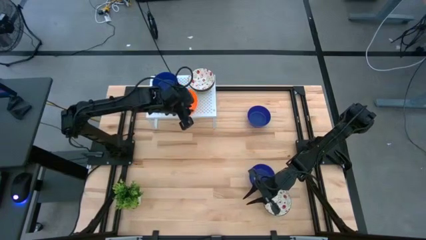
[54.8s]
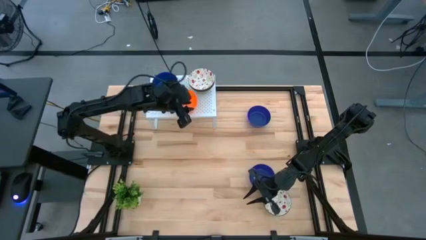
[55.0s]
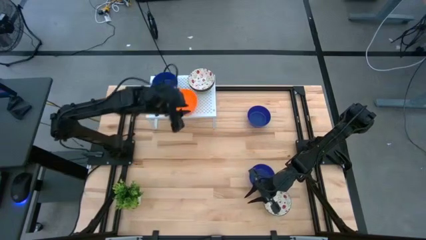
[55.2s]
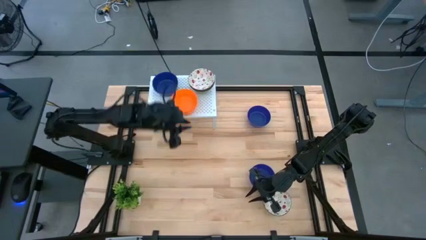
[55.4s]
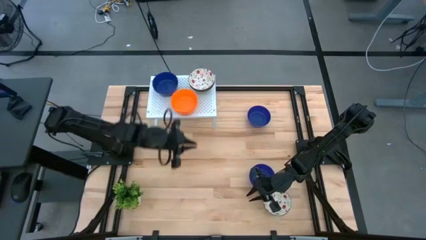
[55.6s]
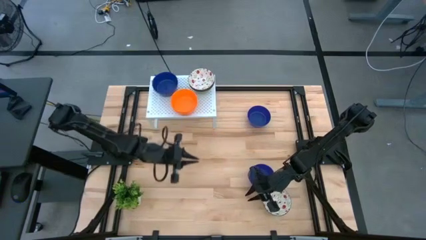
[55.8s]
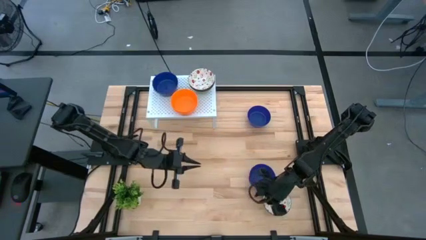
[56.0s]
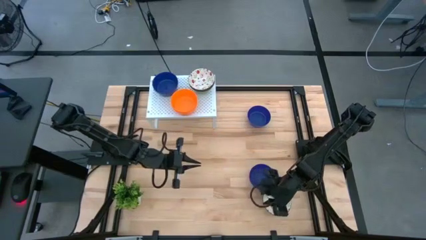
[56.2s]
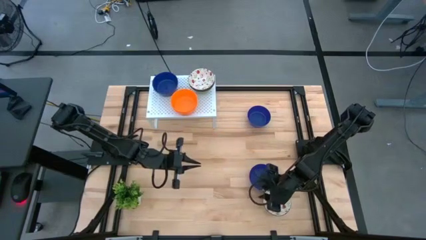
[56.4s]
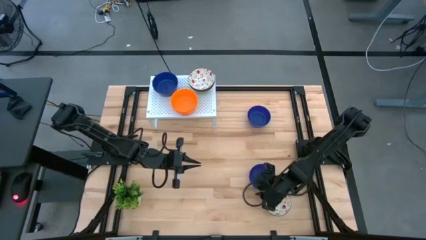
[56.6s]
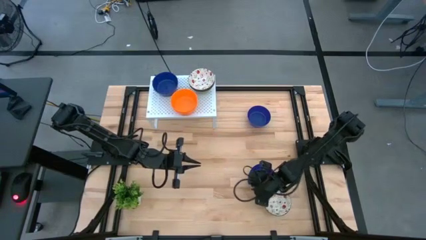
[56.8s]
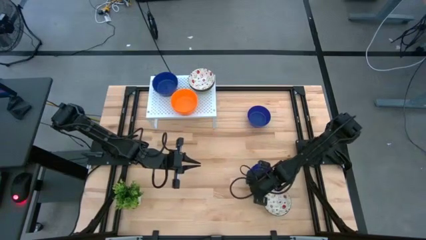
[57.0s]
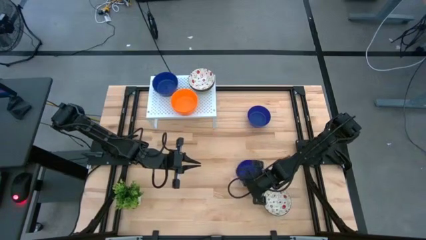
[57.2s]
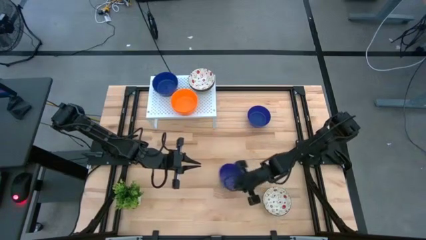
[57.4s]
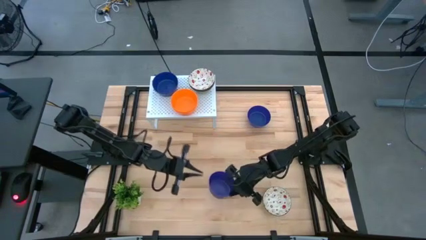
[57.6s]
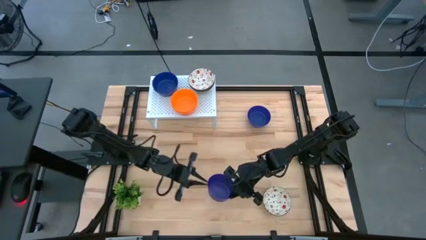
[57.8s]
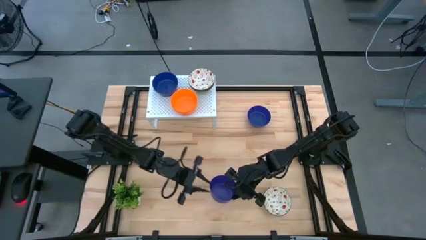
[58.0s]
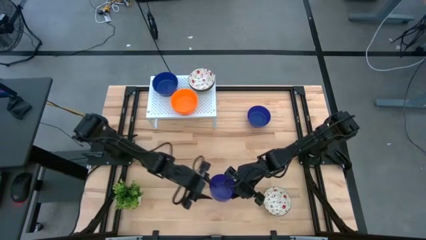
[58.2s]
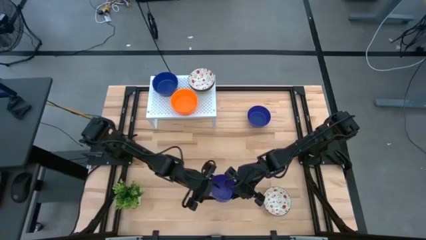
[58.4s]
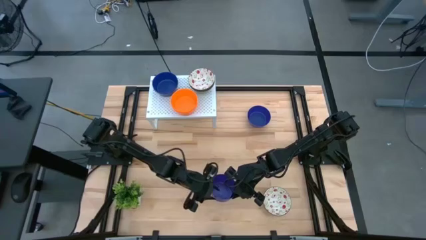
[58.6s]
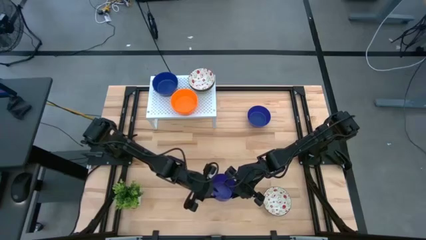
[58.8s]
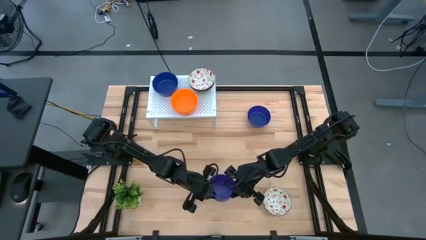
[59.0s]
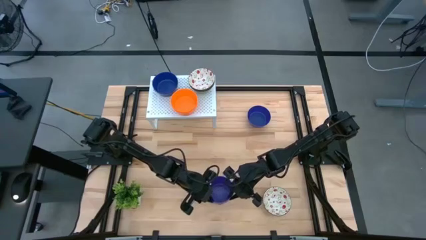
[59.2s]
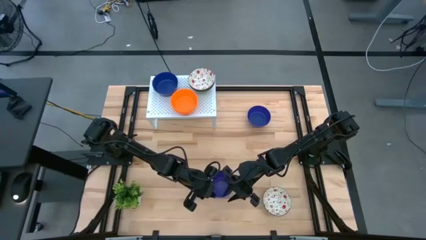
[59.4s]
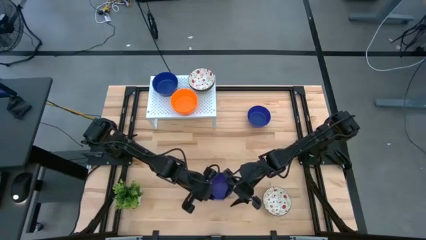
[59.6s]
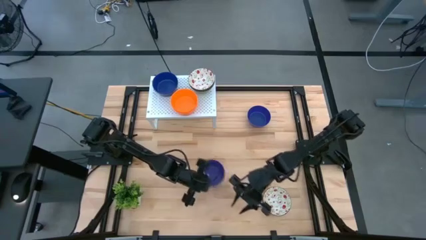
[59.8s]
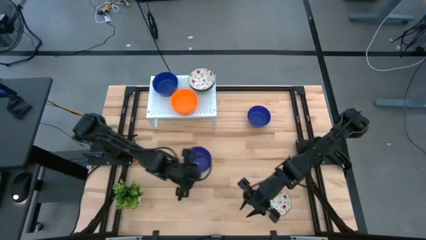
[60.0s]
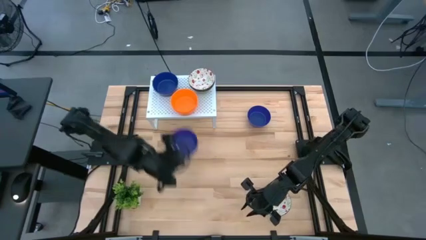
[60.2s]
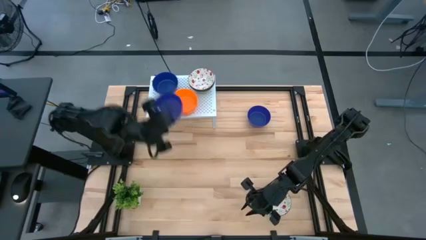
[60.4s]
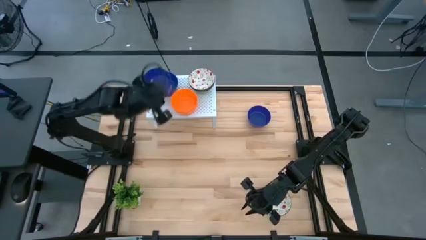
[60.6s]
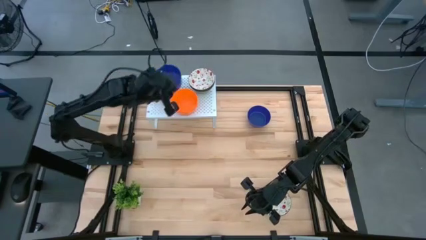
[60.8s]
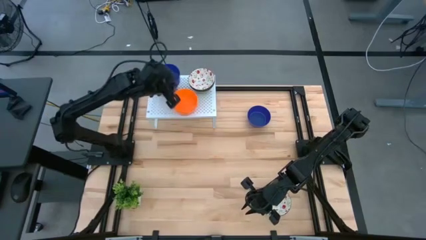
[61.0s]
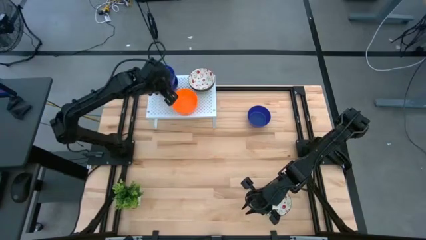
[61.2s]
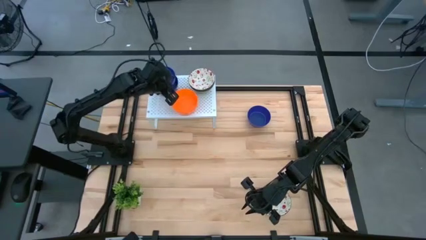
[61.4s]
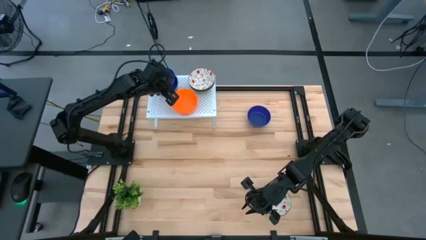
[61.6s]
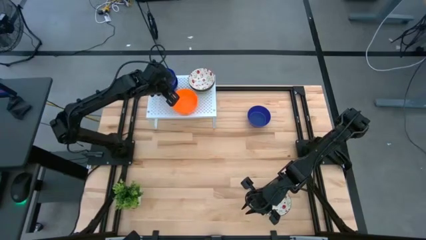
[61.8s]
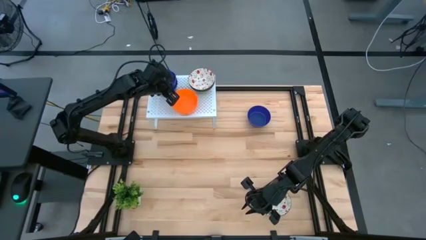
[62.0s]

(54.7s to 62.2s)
Task: Pick & Place Mini bowls
Stack the blue bowl on top of the blue bowls on the shelf

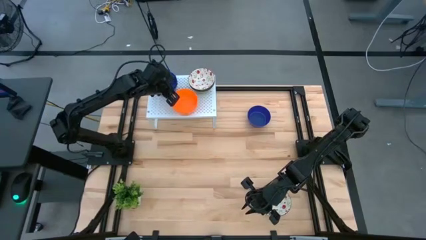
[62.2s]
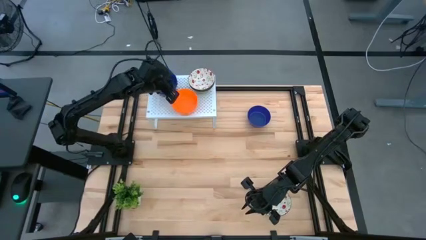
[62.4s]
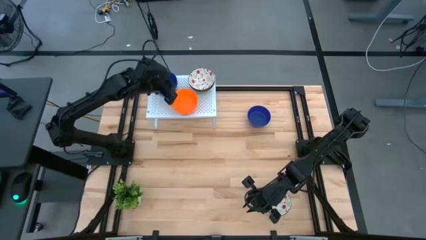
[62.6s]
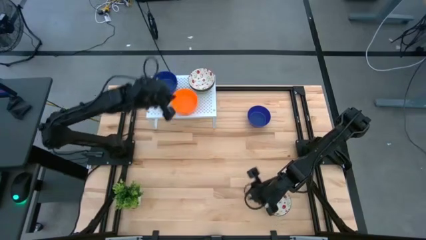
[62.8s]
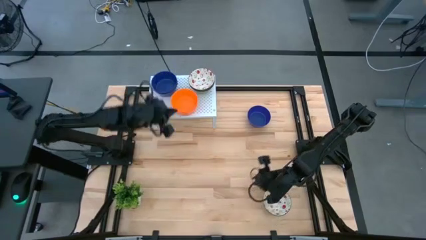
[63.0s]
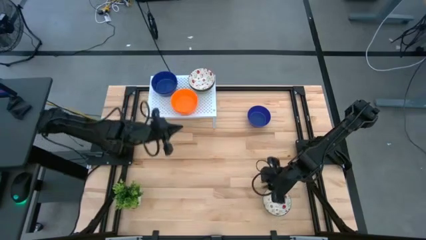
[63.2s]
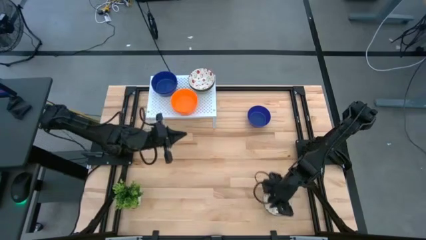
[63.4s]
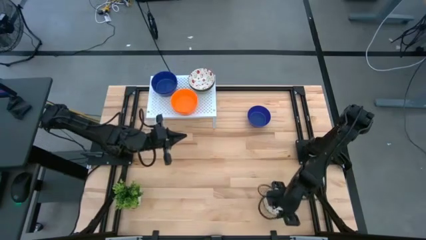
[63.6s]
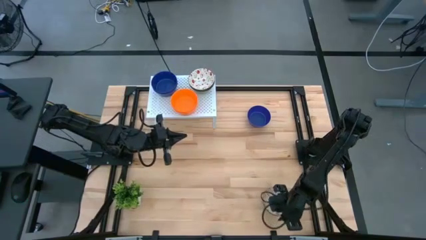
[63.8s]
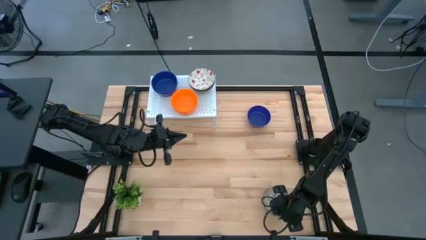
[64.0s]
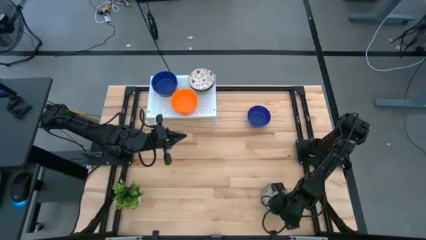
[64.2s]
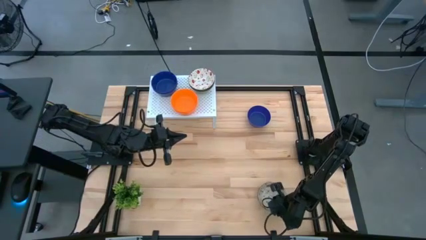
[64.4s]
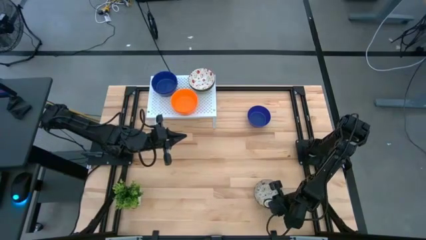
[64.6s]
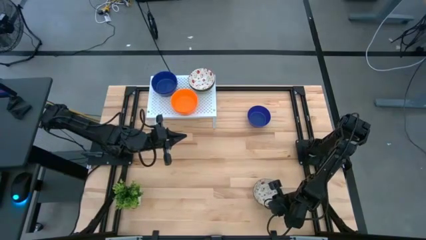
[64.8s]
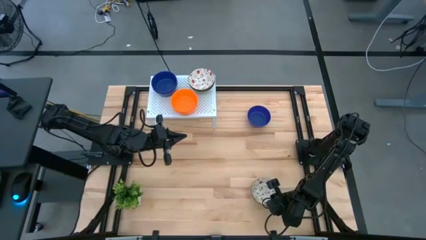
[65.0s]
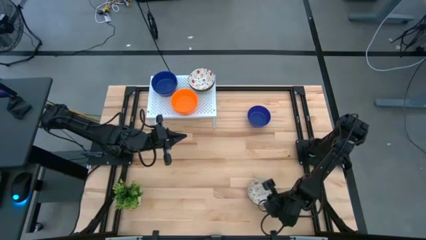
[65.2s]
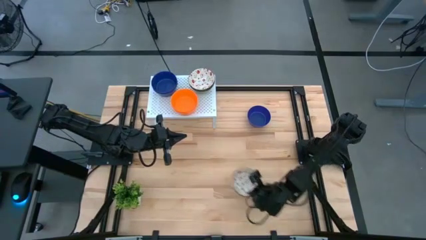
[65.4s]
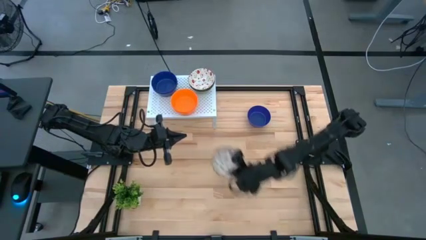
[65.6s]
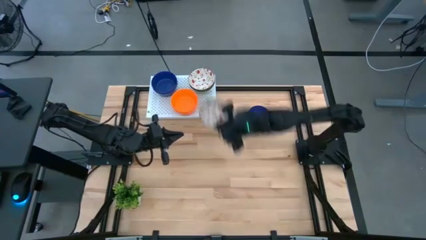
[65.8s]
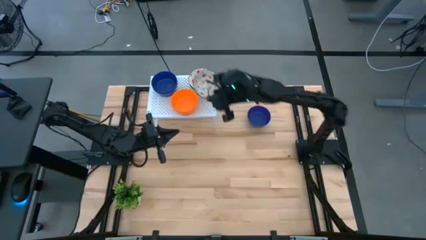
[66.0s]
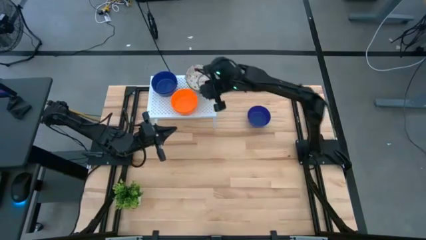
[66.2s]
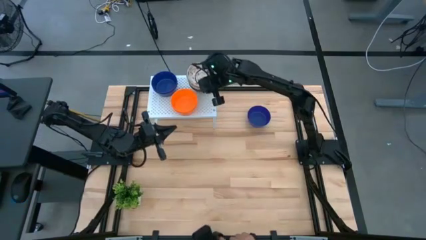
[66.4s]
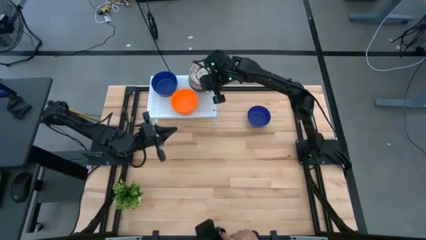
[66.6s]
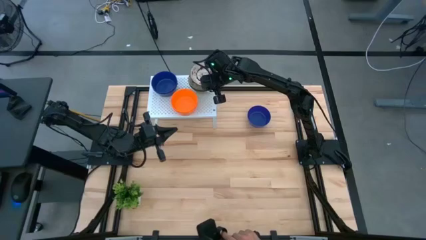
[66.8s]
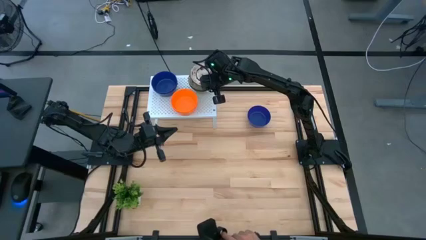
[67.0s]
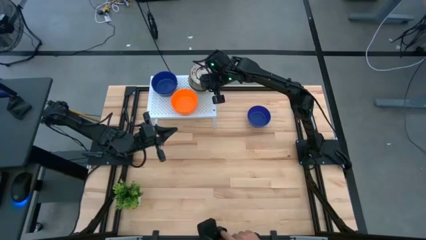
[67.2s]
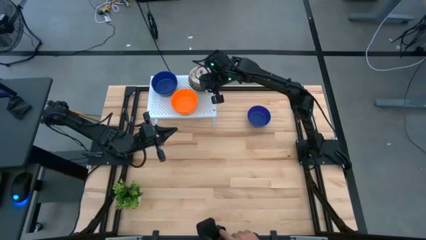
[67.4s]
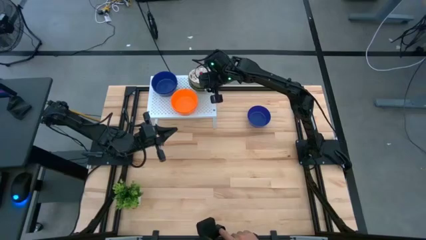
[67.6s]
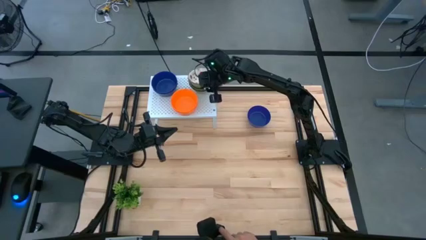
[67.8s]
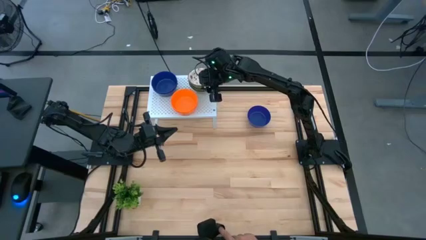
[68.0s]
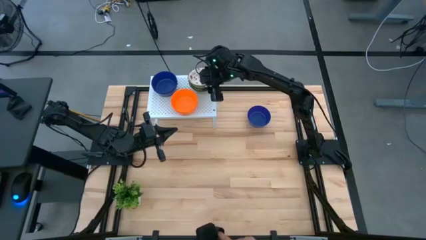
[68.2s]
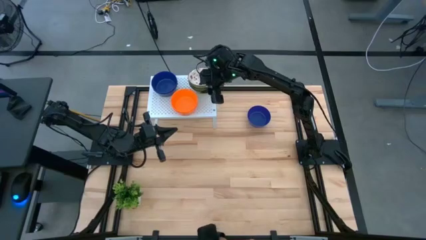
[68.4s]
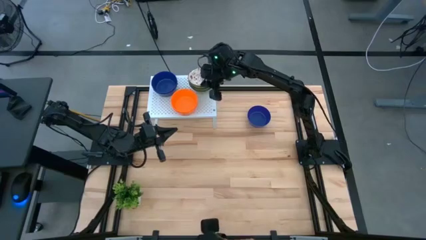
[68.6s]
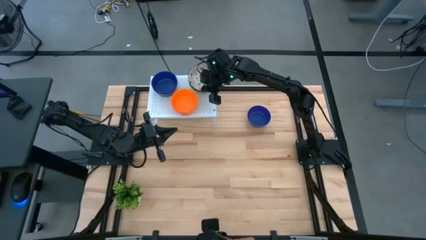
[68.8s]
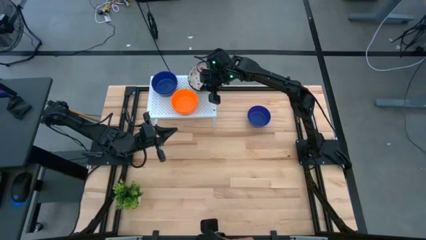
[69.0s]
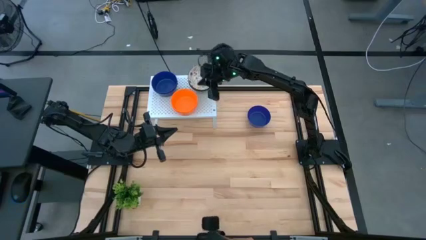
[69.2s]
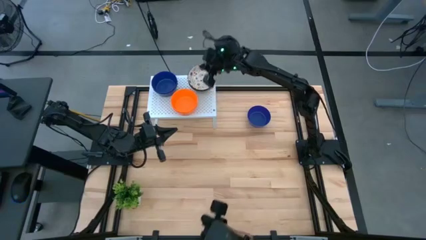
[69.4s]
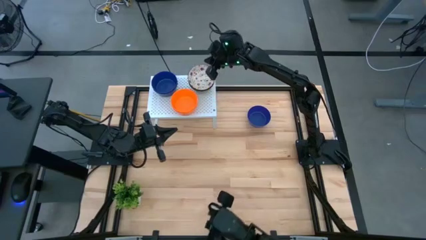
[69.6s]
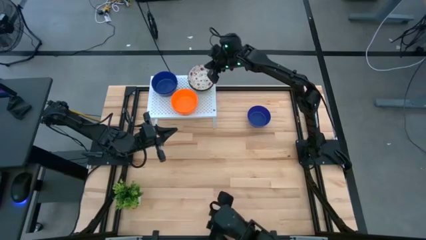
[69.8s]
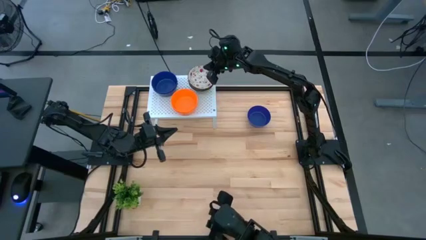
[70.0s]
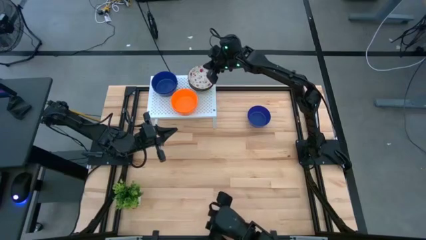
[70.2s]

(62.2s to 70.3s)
Stack the white bowl on top of the white bowls on the shelf

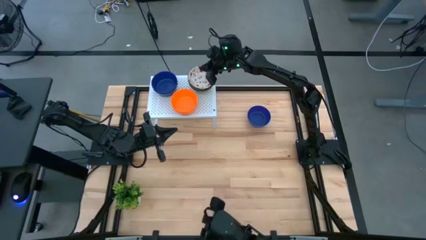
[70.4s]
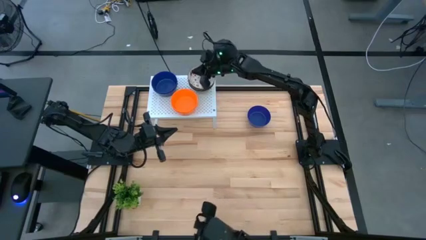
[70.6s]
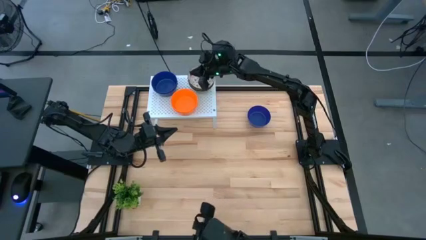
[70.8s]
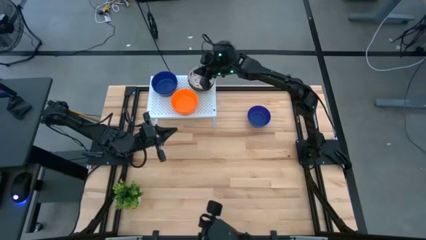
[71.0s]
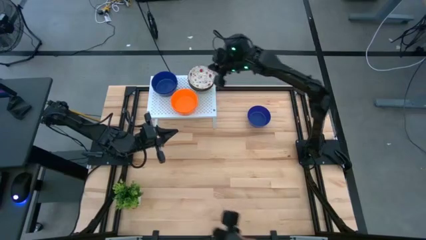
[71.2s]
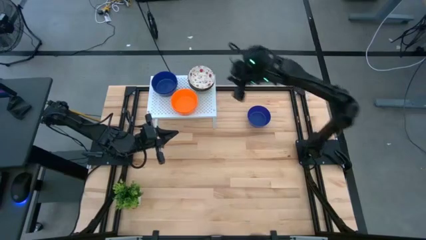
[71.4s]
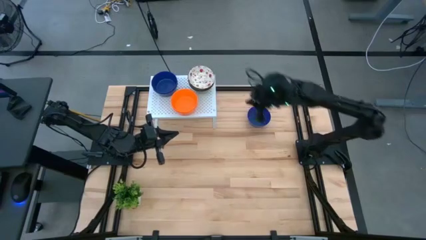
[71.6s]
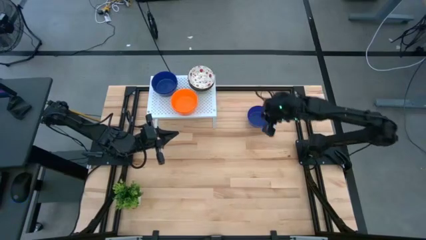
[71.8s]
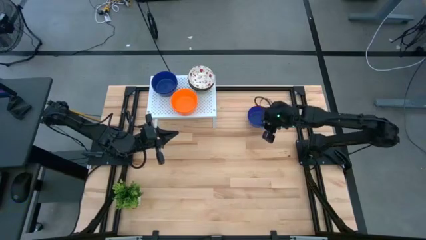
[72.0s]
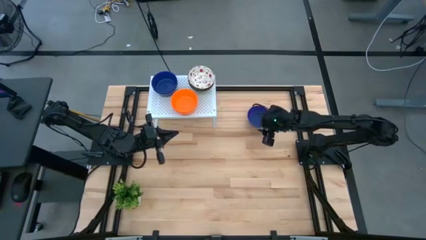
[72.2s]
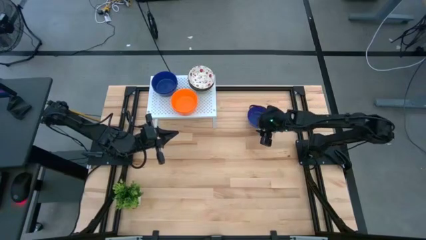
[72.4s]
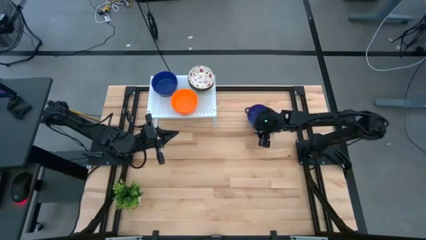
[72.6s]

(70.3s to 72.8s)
Stack the blue bowl on top of the blue bowls on the shelf
